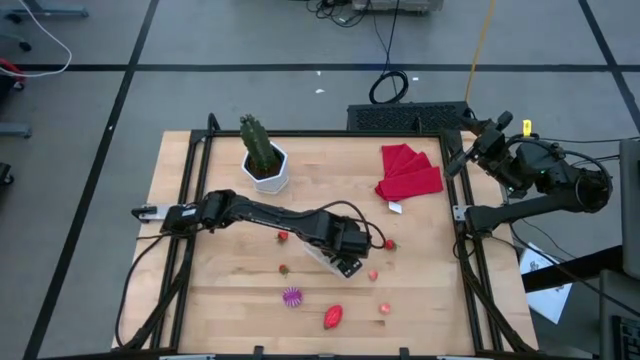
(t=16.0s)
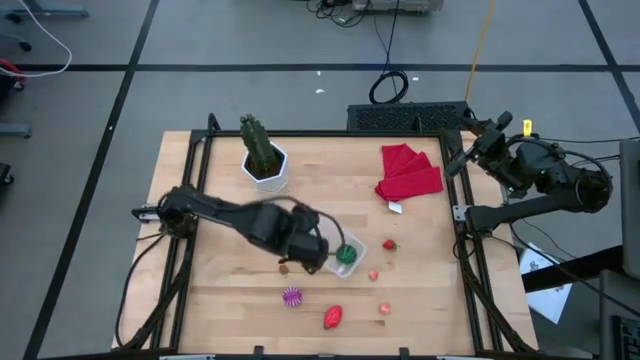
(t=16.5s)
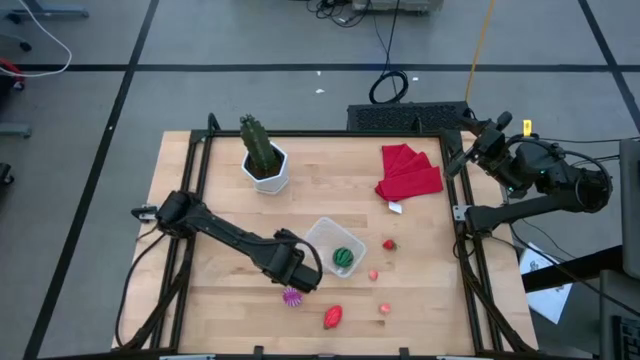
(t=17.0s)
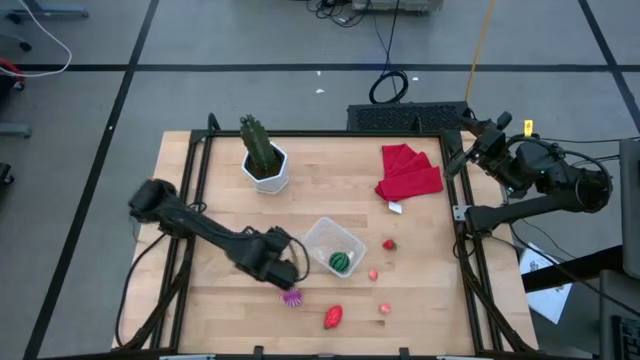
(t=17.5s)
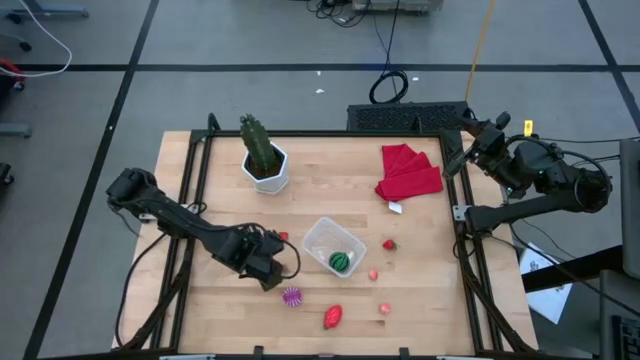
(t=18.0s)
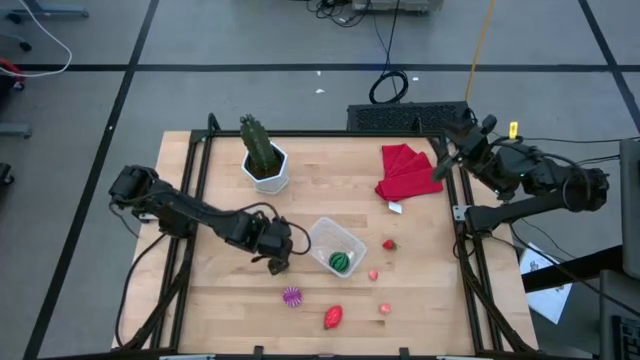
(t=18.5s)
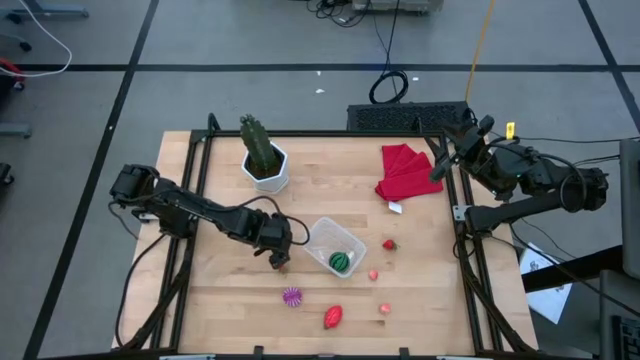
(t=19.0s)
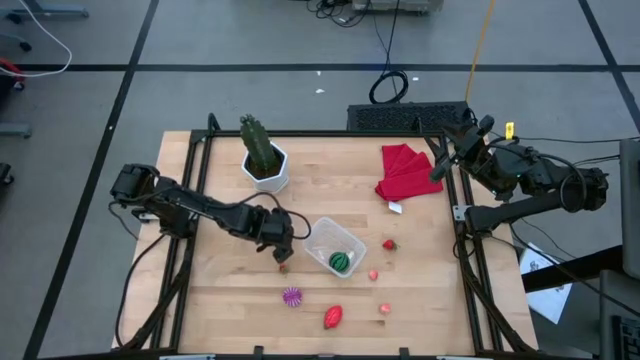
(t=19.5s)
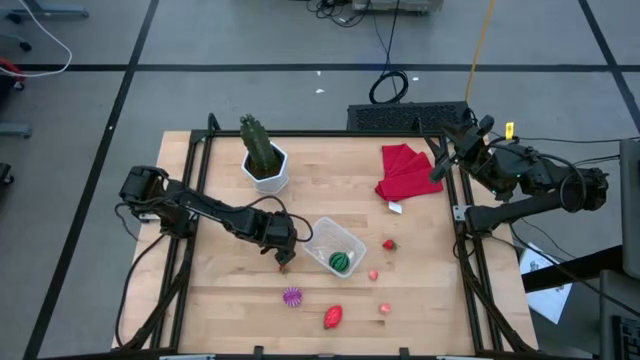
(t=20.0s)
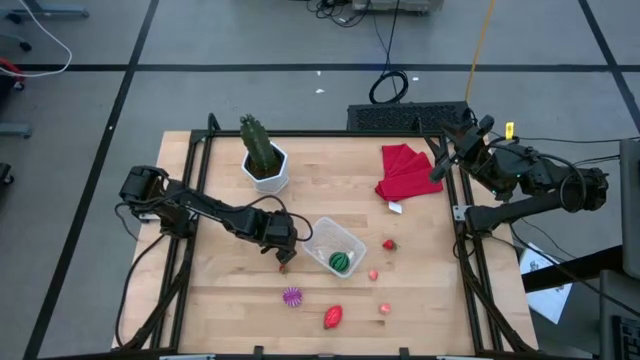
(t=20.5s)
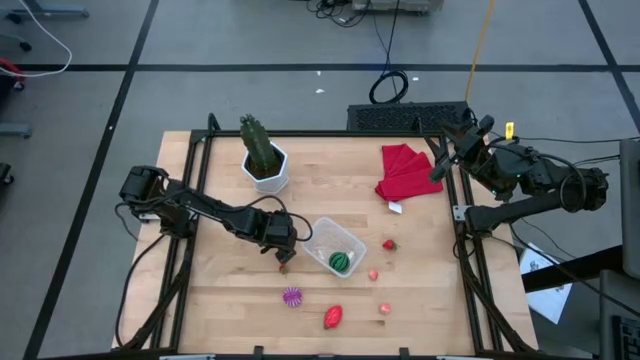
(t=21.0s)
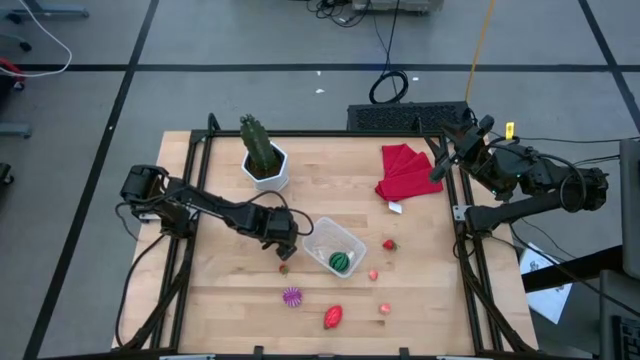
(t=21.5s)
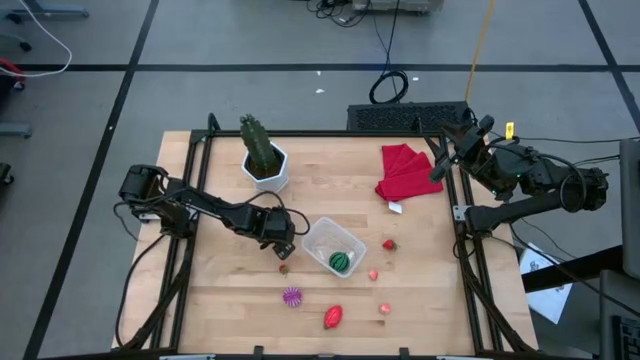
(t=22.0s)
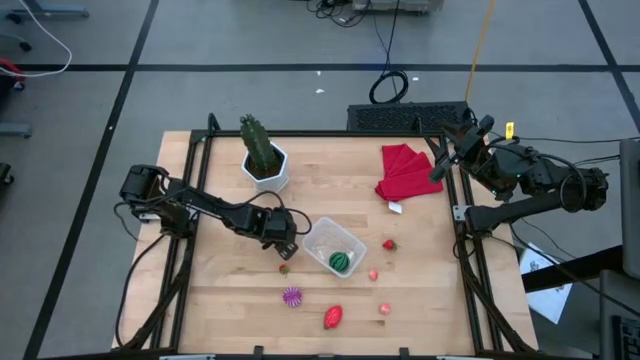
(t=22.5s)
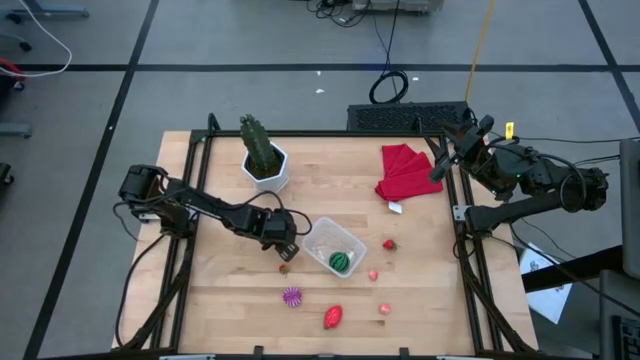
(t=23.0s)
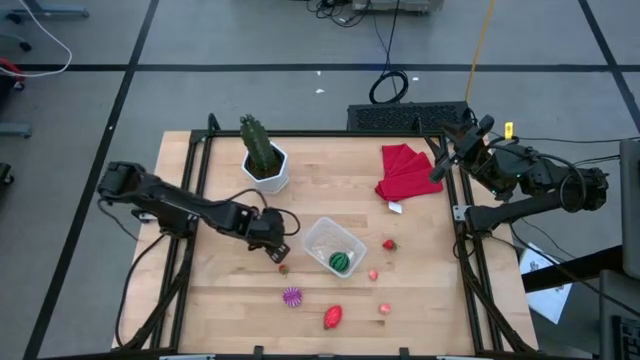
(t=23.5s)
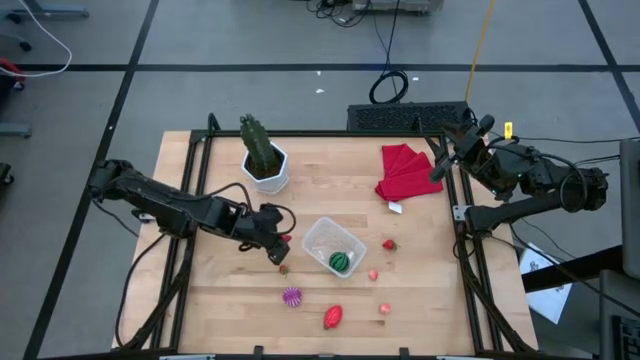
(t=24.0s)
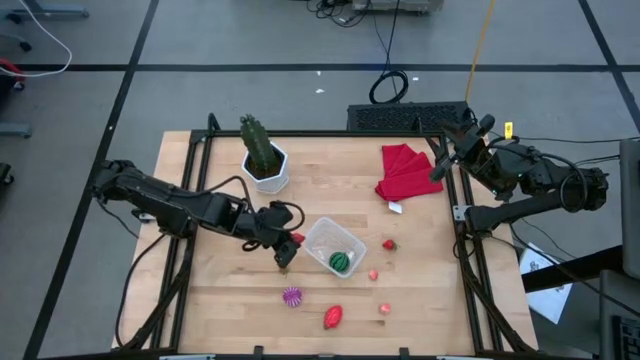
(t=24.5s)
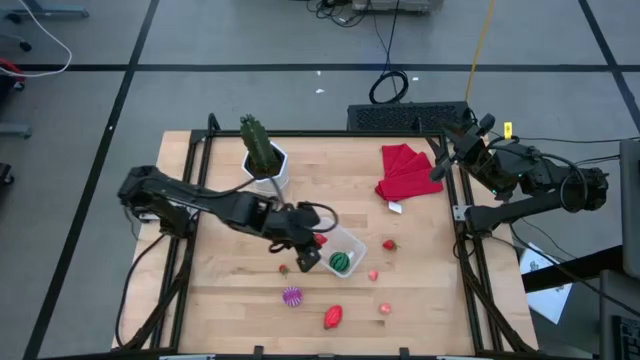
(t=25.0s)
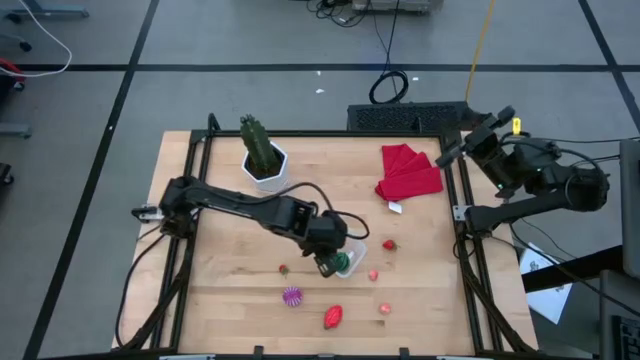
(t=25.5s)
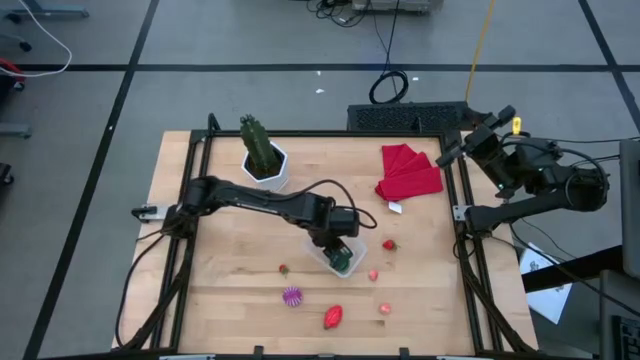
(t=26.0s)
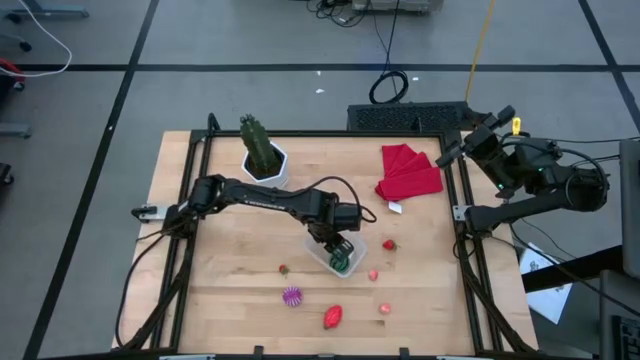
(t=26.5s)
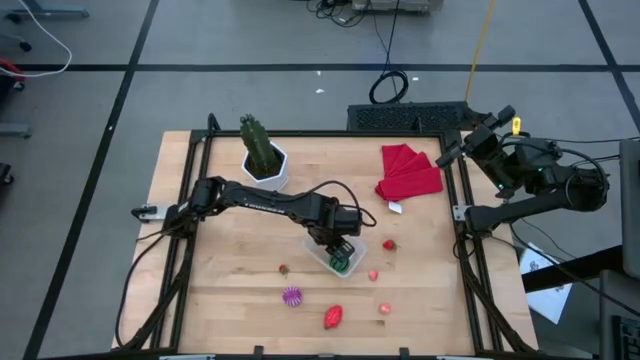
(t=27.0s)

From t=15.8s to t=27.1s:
Task: Pick and placing Produce into tupperware
Put the top left strawberry into the transparent bin

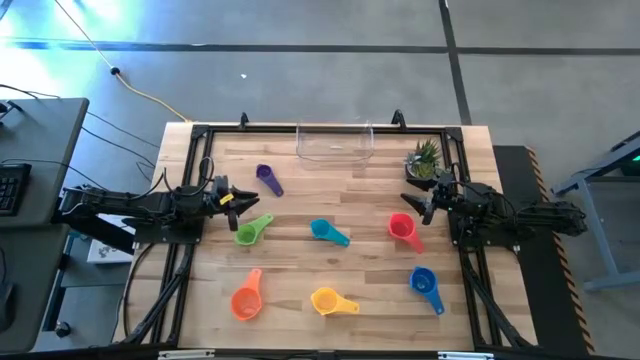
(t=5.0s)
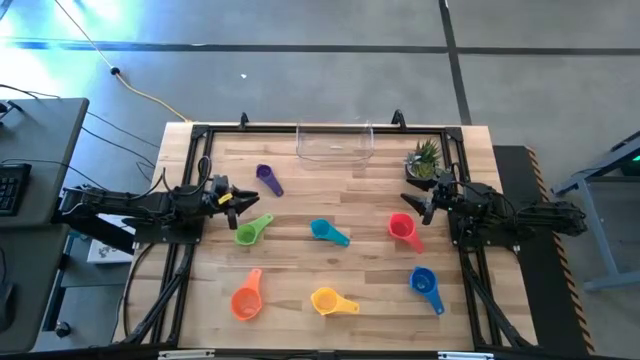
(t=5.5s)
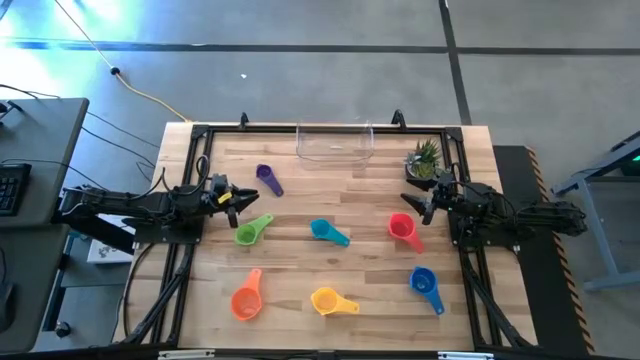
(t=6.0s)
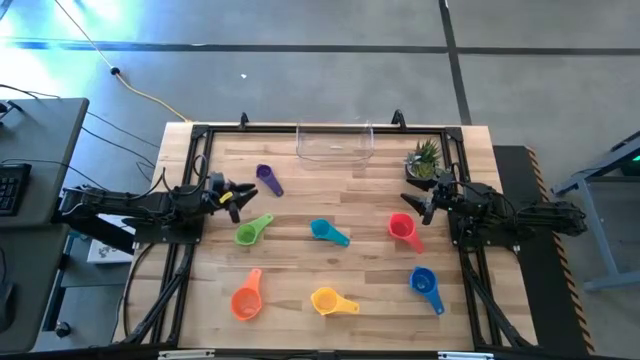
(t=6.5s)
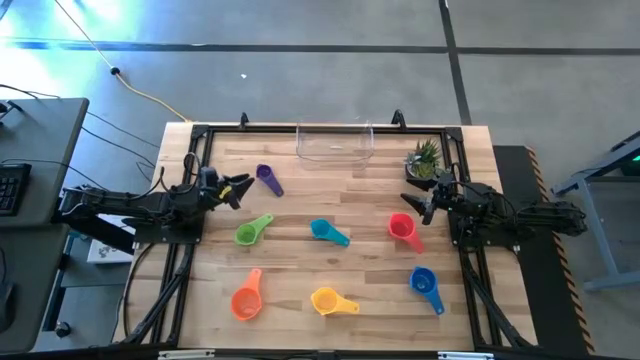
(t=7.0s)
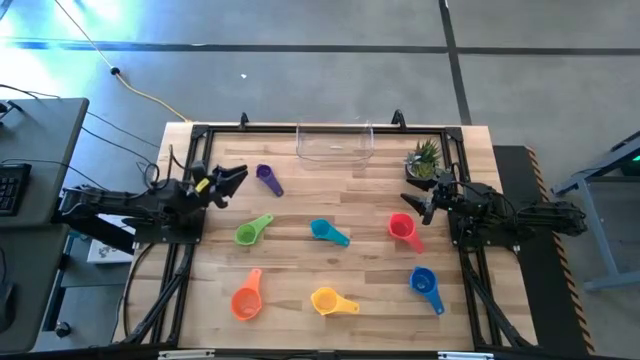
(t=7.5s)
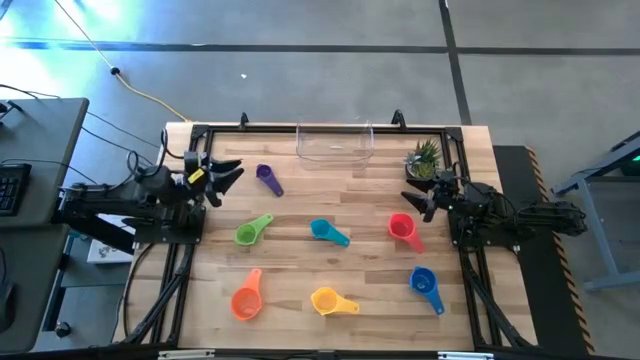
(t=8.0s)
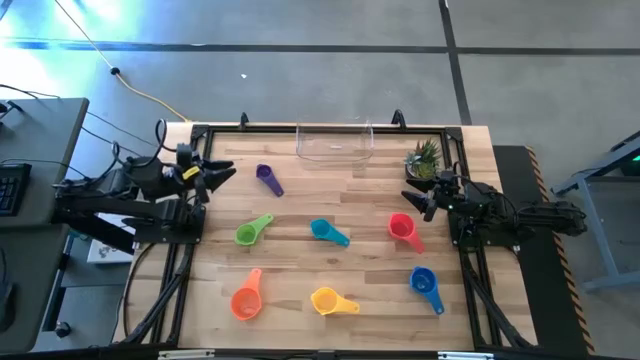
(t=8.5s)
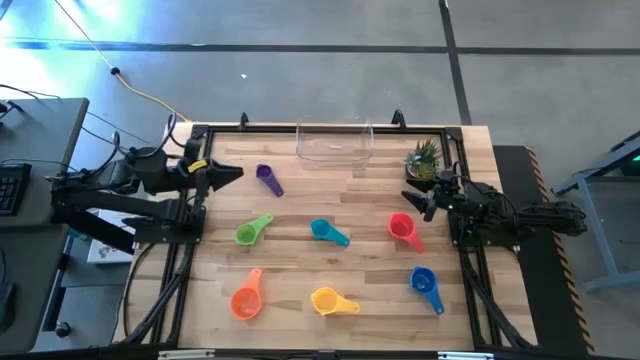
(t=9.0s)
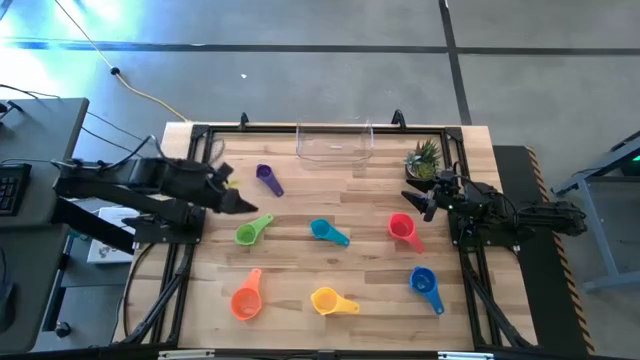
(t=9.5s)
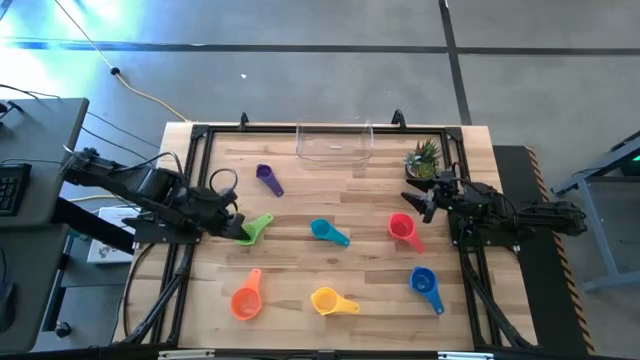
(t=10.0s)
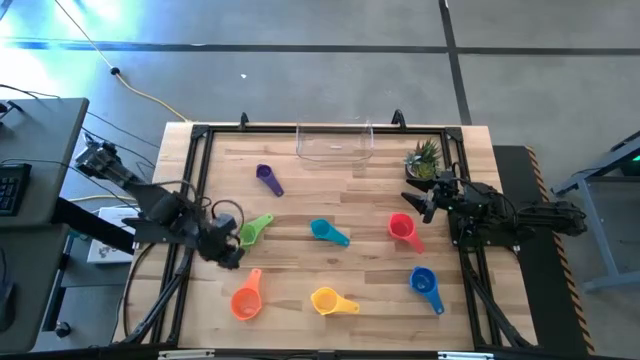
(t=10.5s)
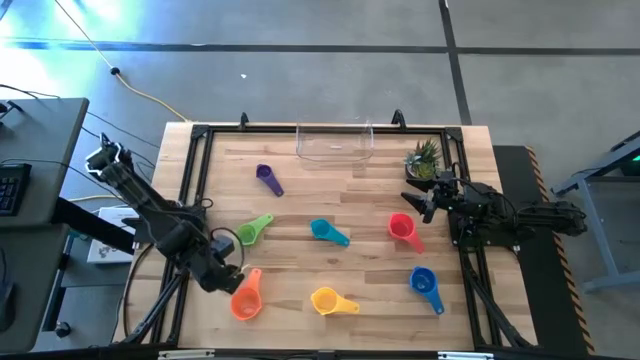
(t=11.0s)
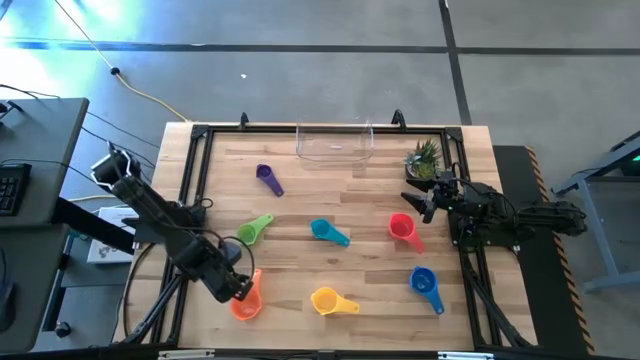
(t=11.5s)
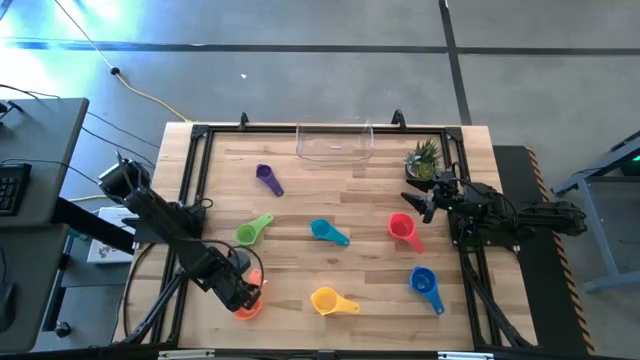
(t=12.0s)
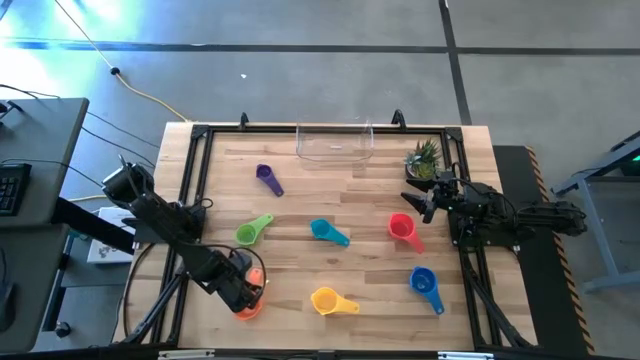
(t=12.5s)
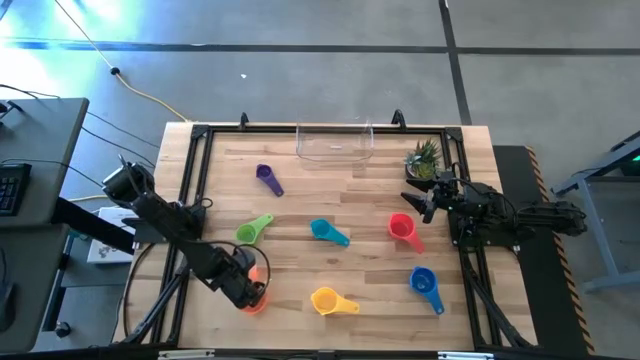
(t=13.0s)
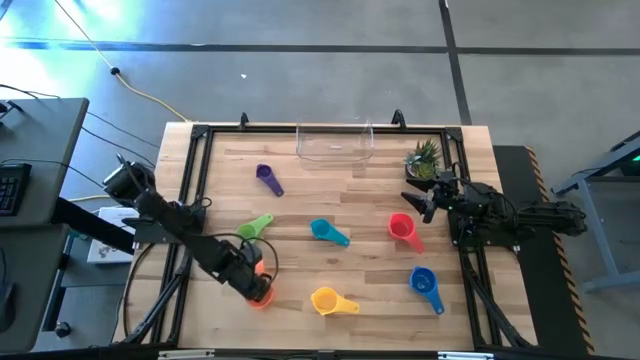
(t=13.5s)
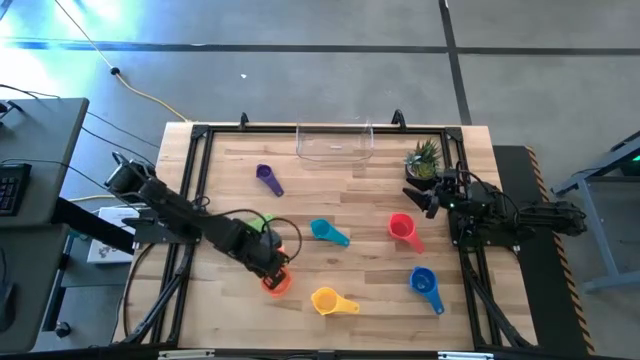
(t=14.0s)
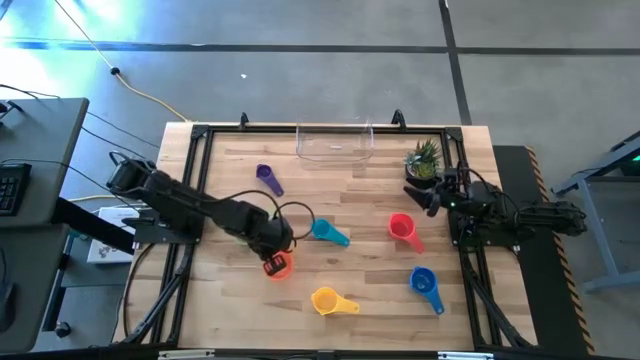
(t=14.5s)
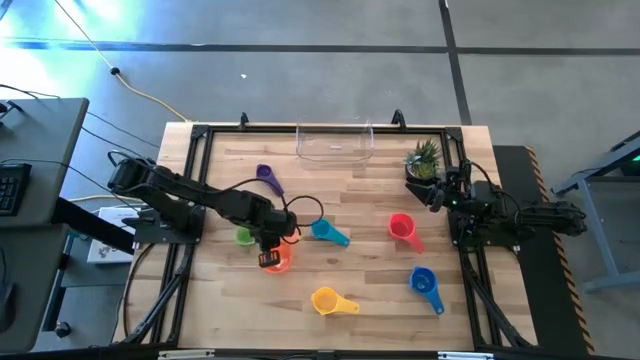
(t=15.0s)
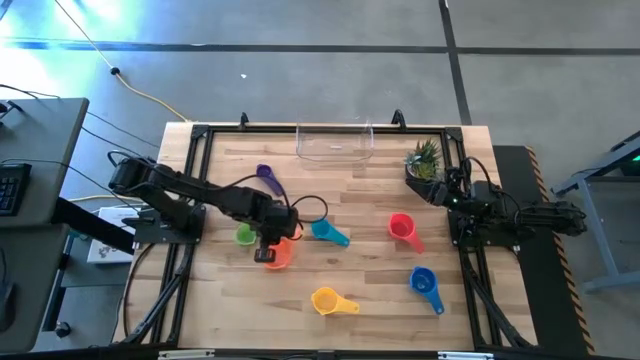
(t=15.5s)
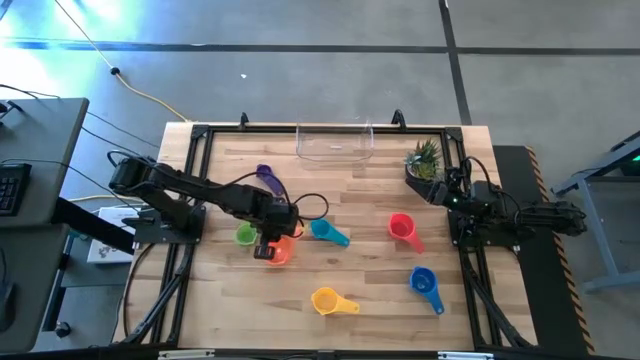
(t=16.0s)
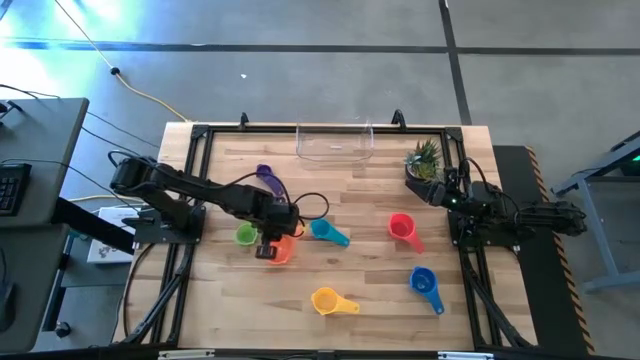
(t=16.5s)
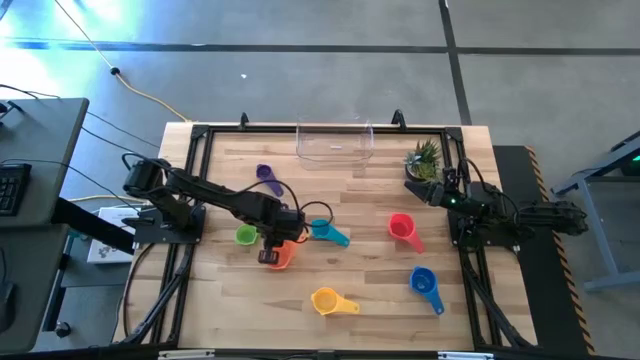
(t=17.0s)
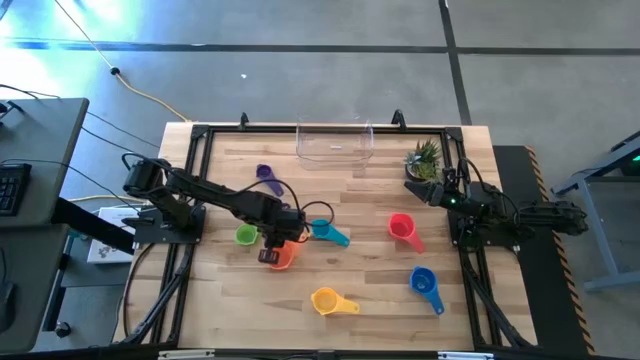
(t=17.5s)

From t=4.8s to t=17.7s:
Task: Nest measuring cups in basket
Move the orange measuring cup to the middle of the table
